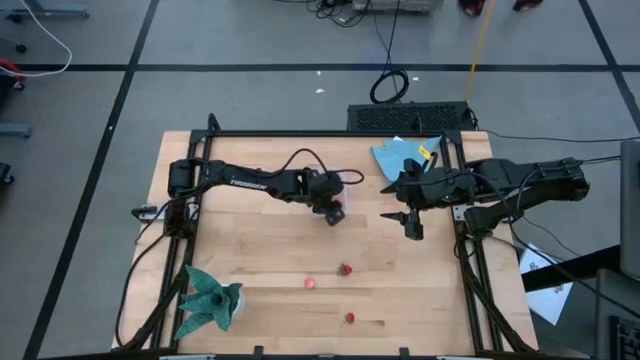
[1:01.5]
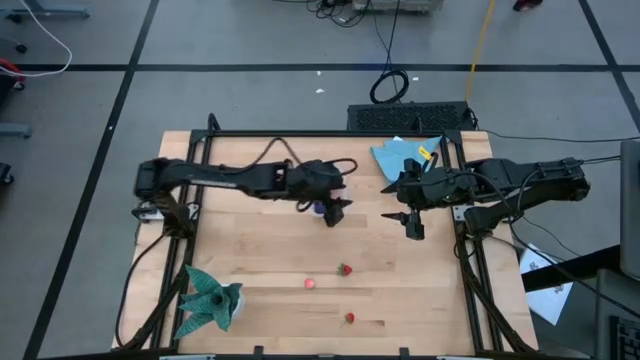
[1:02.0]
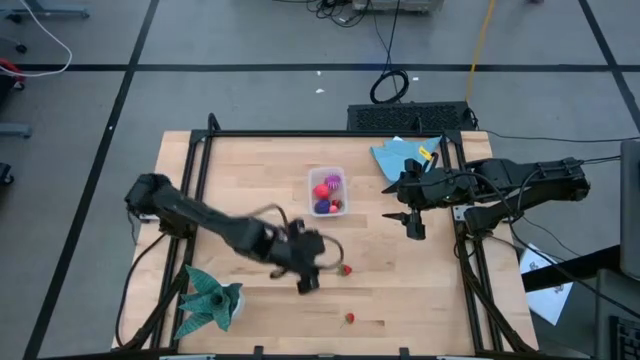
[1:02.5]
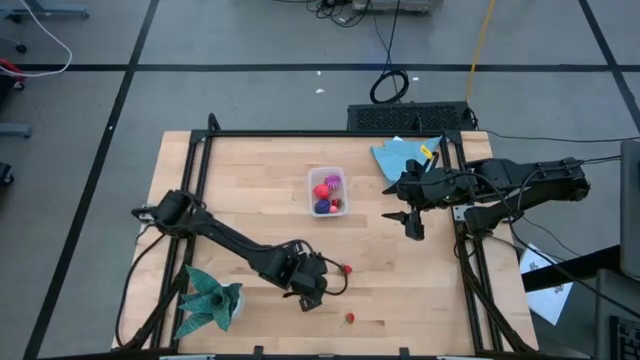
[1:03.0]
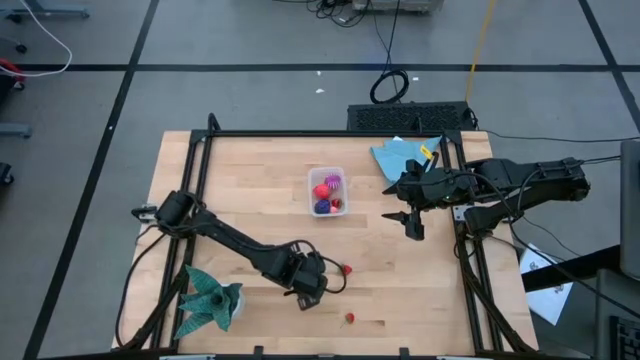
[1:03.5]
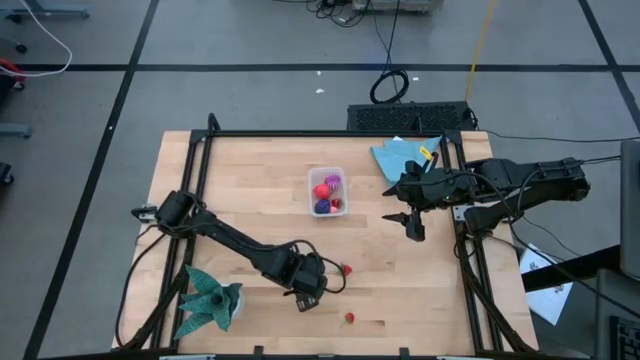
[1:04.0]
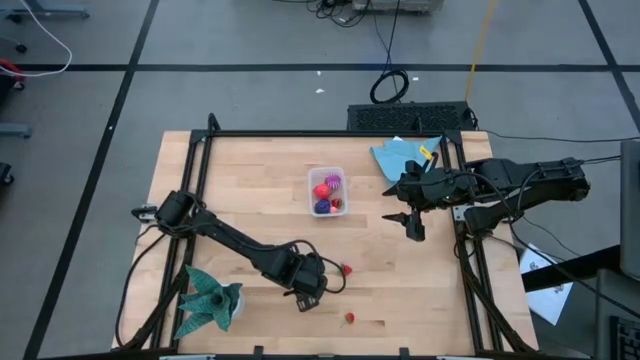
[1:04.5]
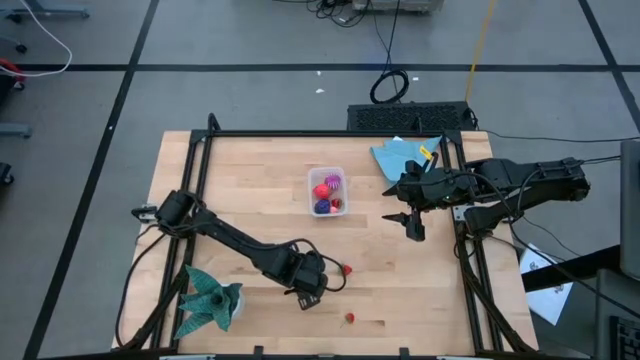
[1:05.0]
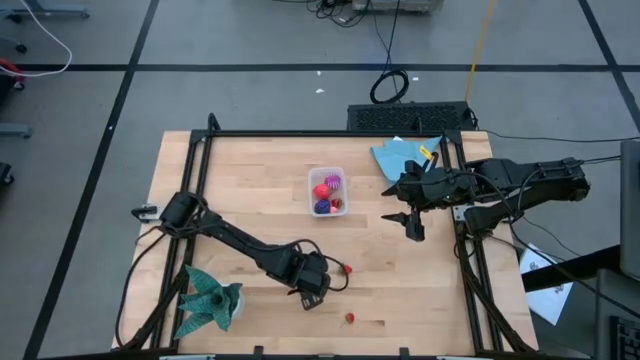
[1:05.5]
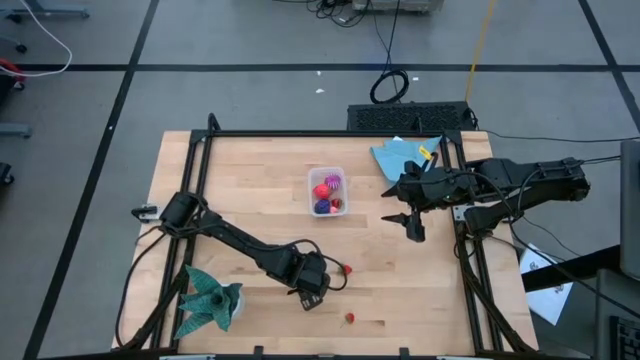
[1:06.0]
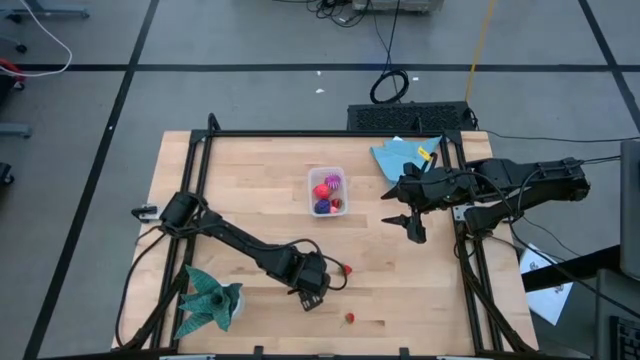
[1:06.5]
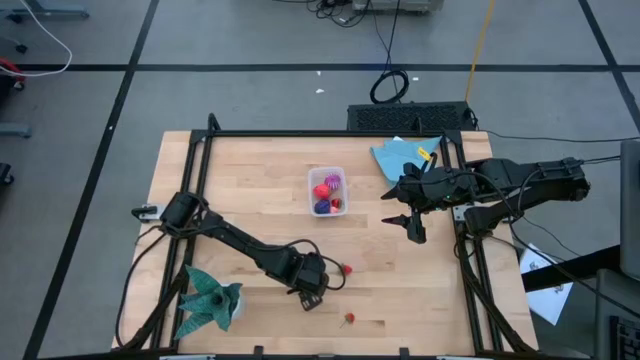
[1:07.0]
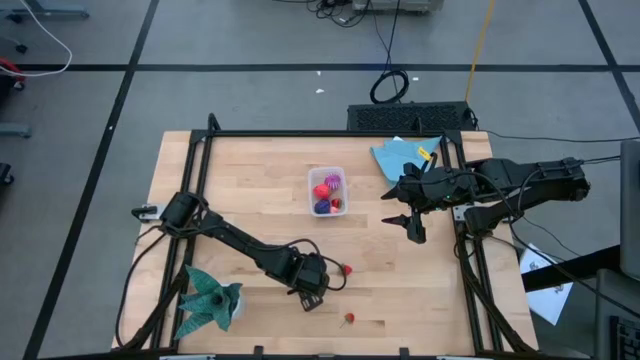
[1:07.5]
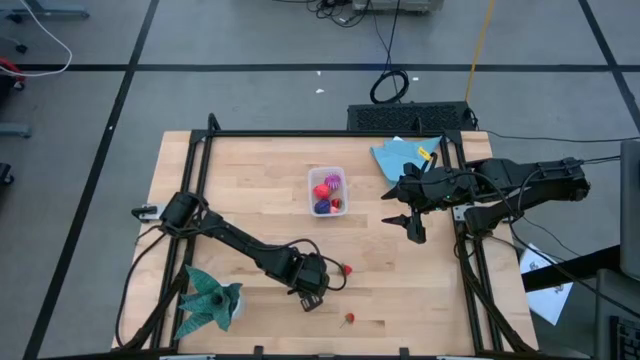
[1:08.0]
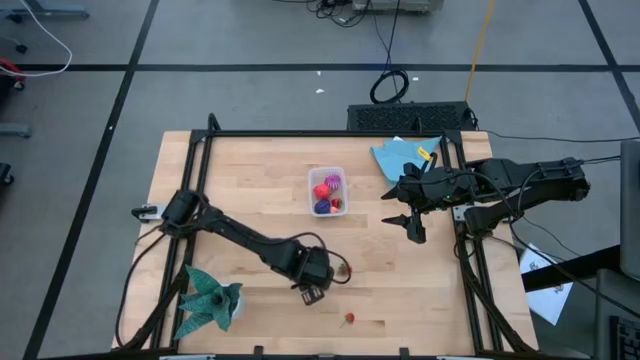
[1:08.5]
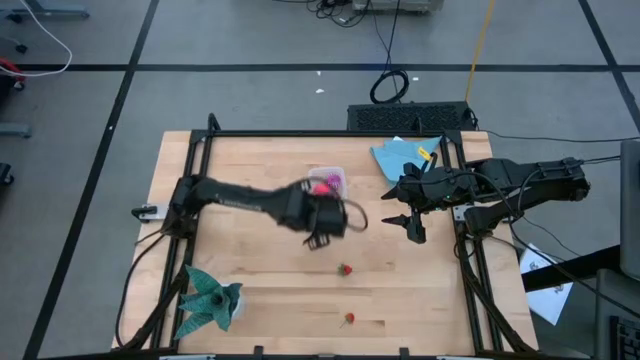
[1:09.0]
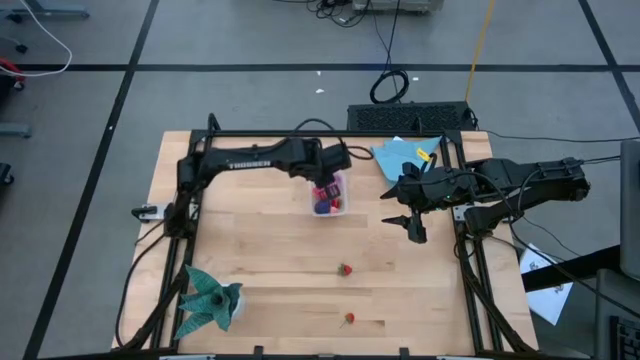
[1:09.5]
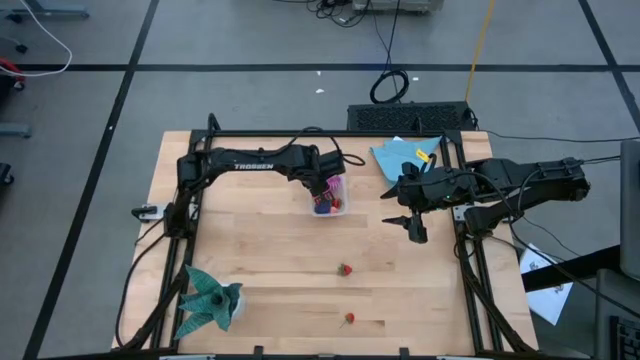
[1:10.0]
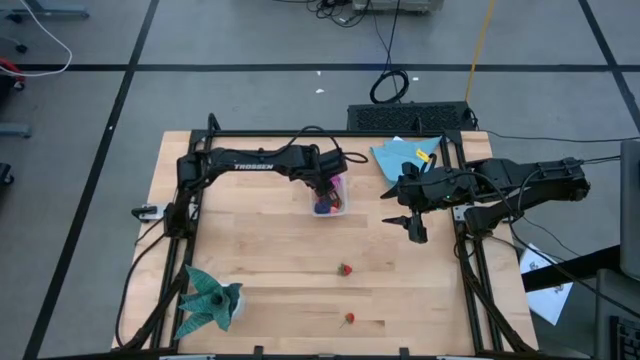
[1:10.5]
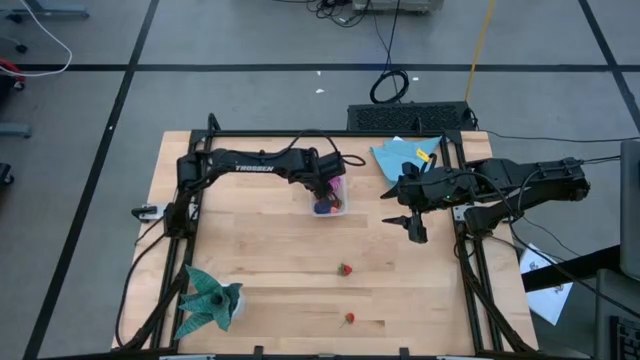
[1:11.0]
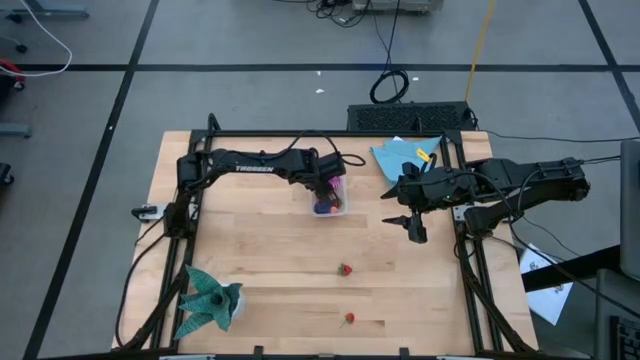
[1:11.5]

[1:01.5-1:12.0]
Task: Pick and placing Produce into tupperware
Put the pink peach into the transparent bin

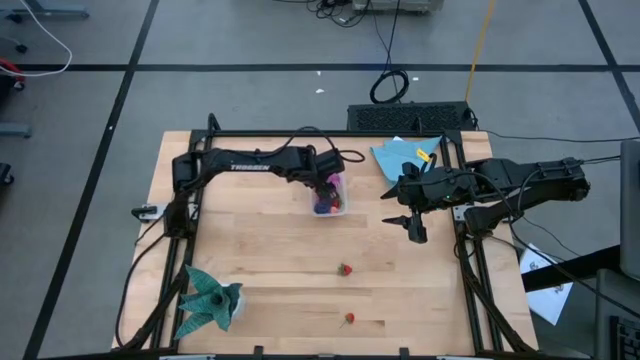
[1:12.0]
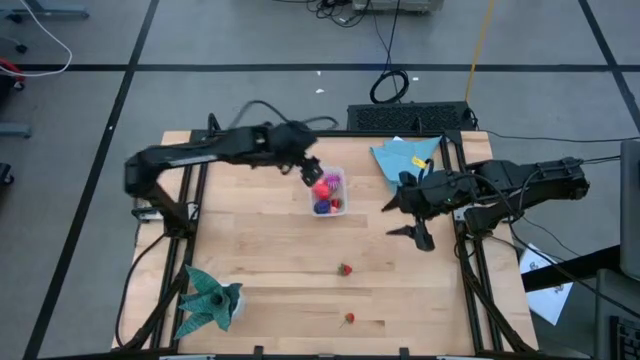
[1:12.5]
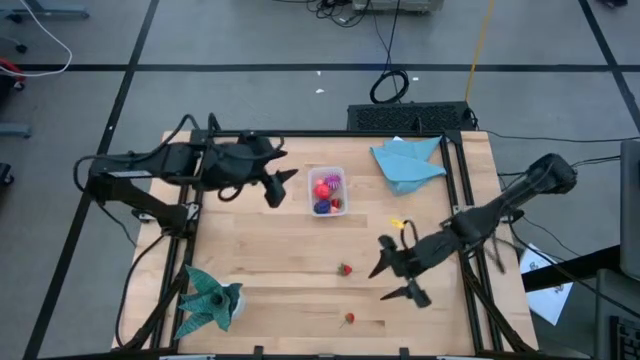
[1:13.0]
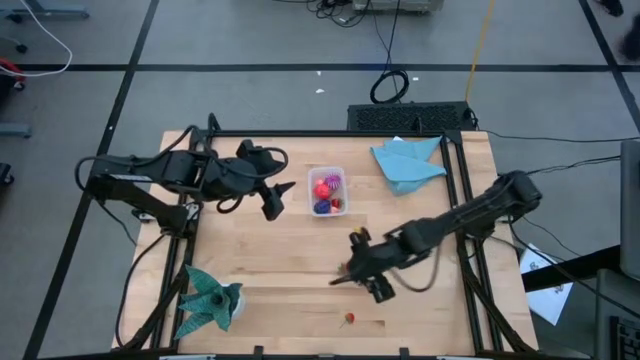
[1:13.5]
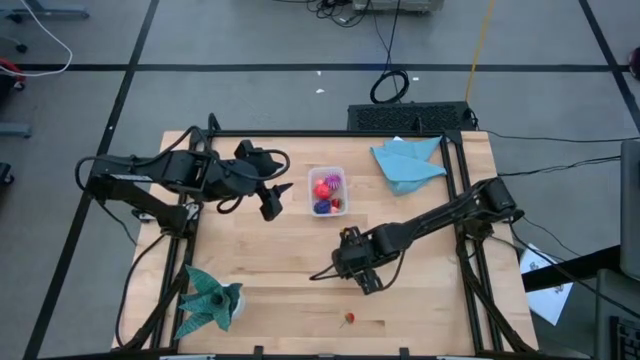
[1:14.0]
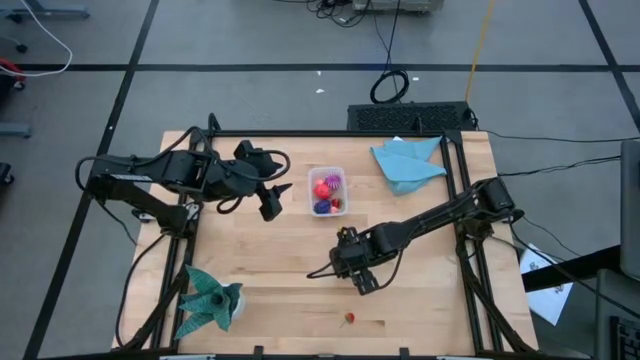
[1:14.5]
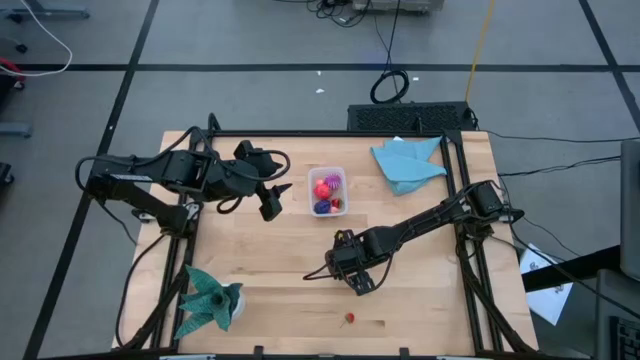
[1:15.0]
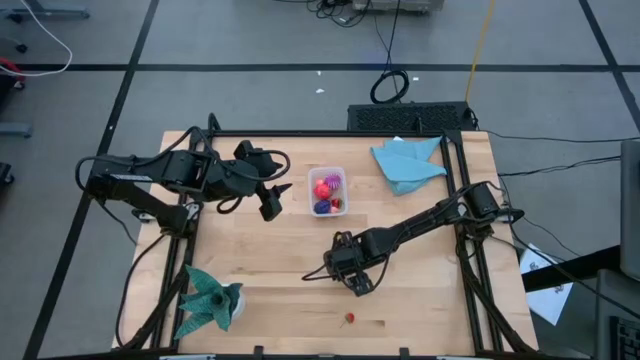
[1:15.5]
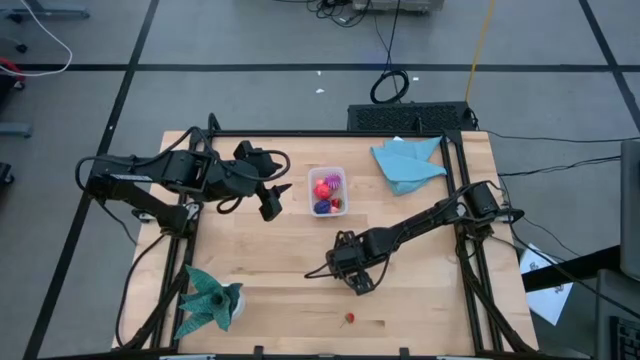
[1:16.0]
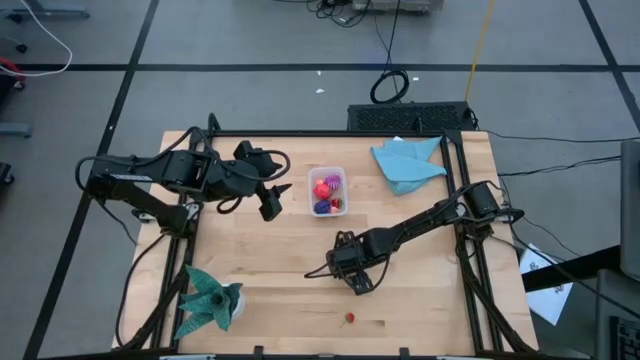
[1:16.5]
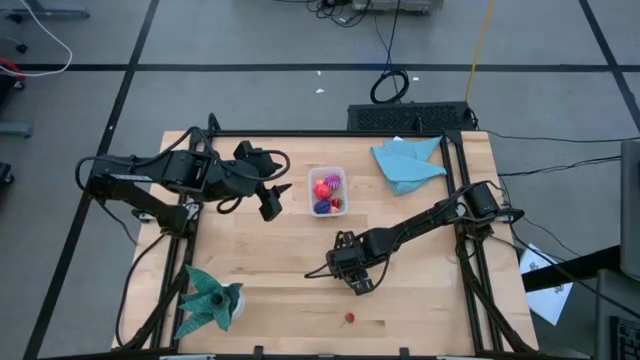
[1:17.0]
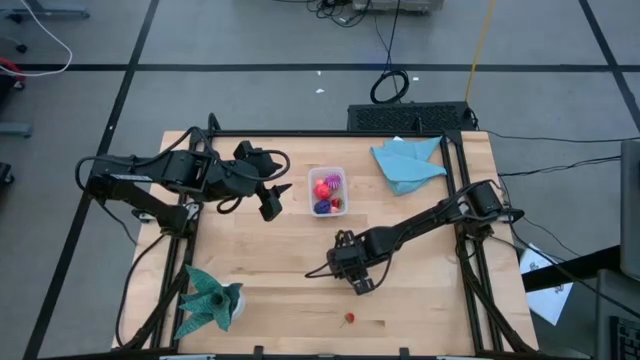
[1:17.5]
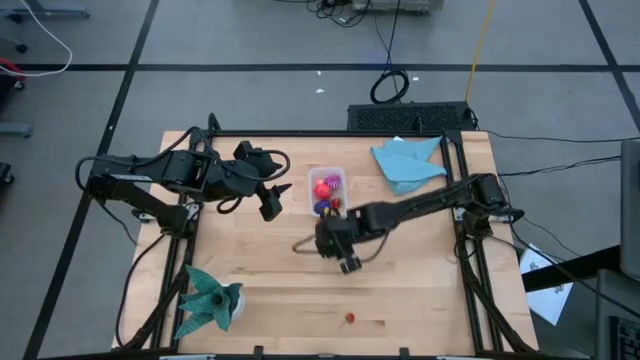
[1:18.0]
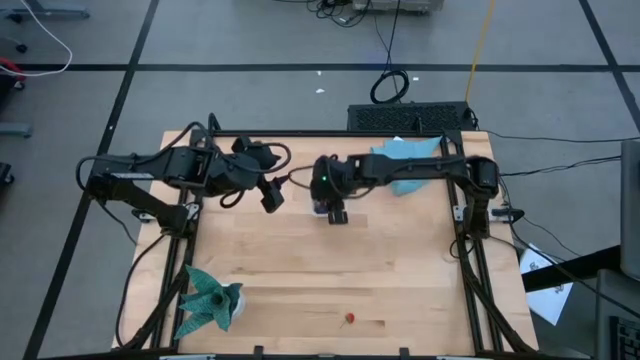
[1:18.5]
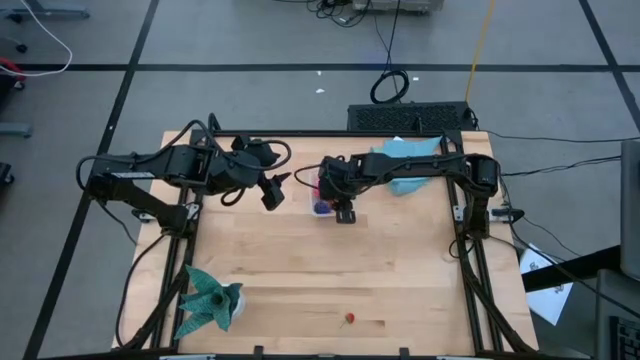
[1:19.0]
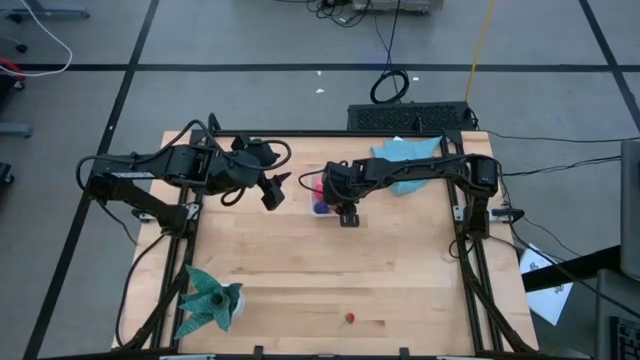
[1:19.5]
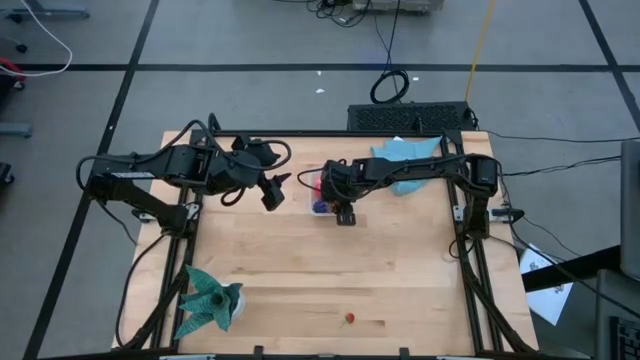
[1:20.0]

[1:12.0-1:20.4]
Put the top red strawberry into the transparent bin

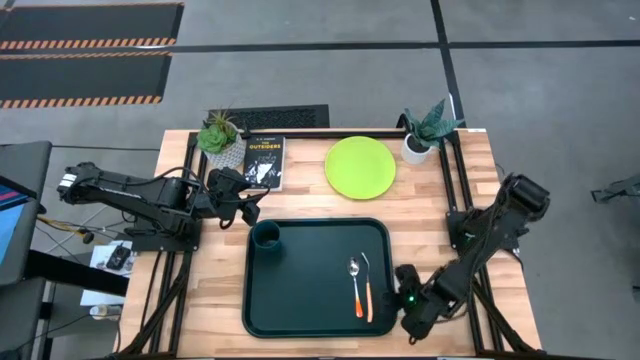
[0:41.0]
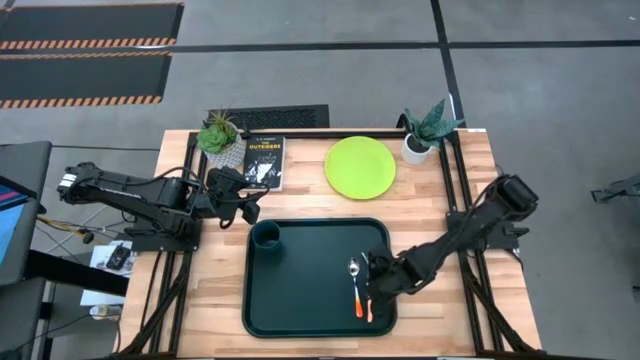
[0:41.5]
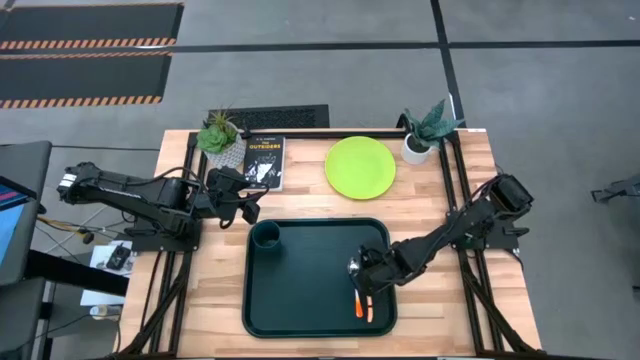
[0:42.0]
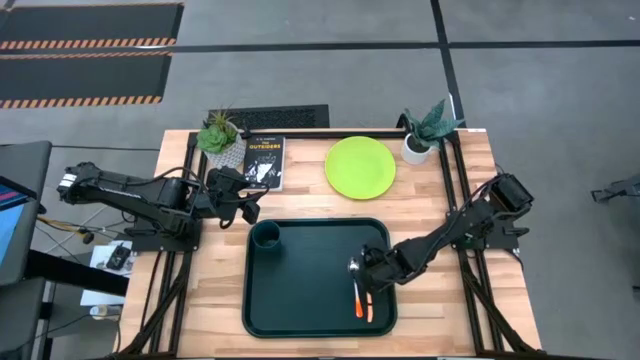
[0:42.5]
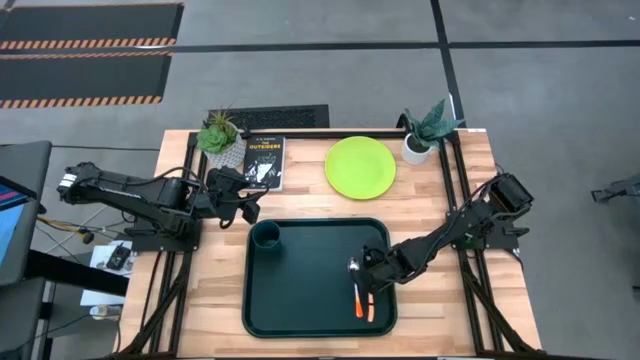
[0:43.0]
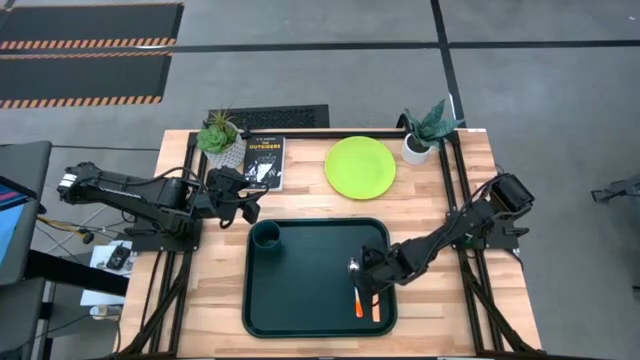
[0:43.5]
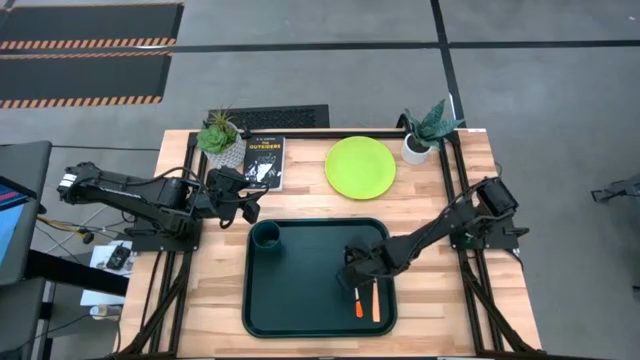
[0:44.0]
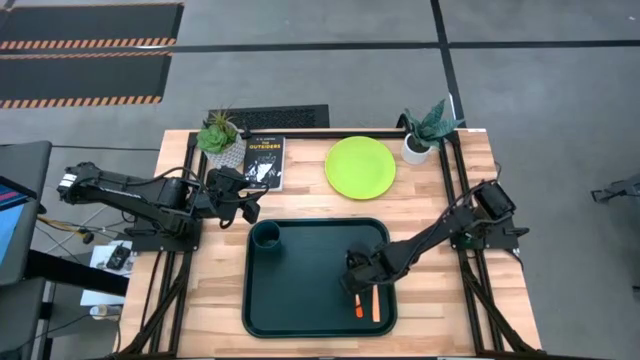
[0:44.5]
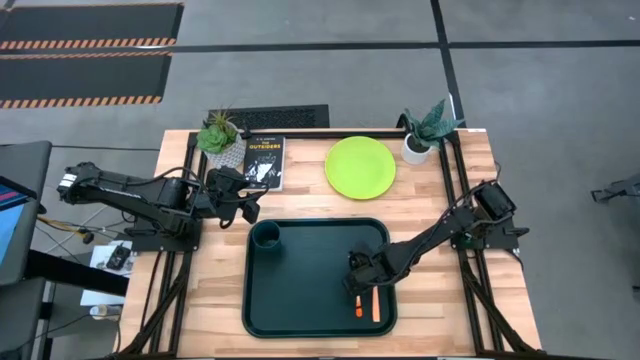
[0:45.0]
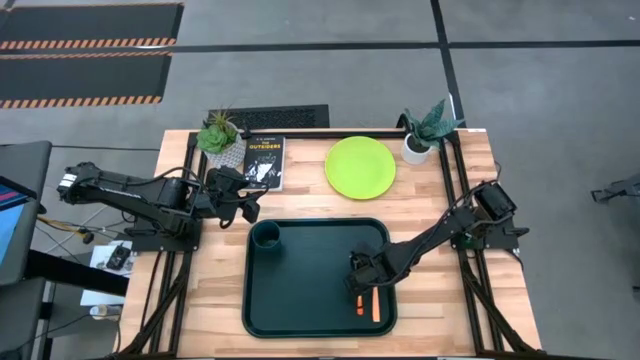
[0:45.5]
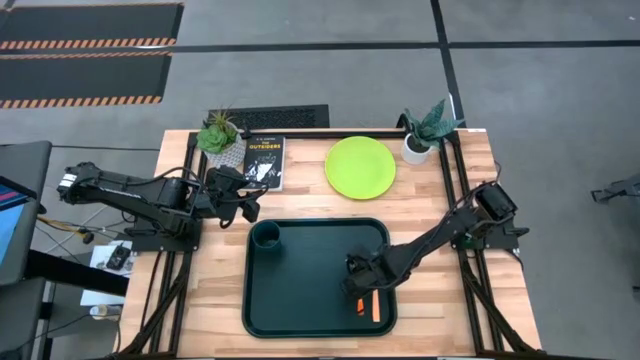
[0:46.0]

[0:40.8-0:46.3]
Task: Pick and place plate/cup/fork/spoon on tray
Adjust the silverware in the black tray
